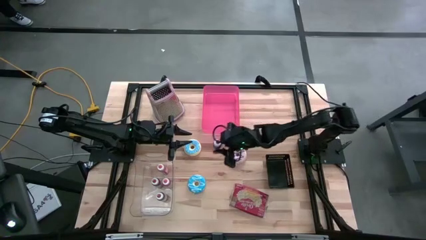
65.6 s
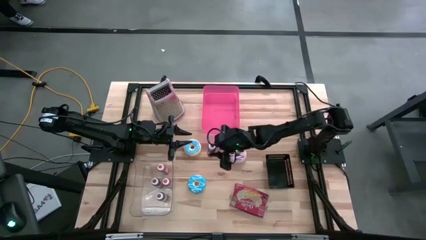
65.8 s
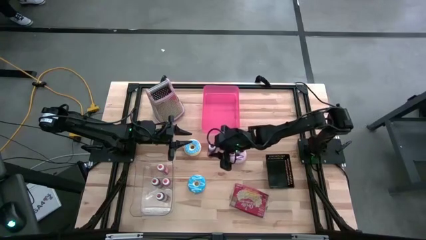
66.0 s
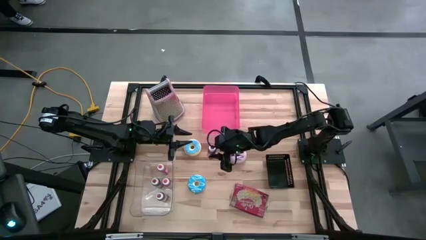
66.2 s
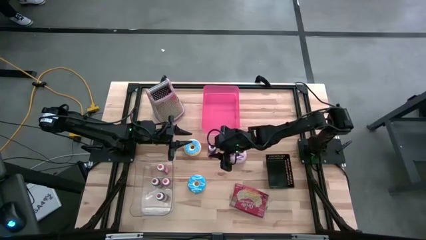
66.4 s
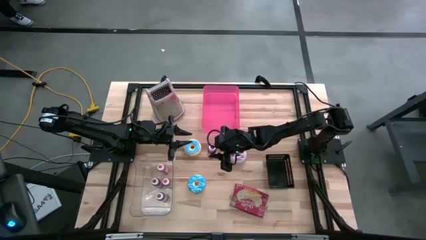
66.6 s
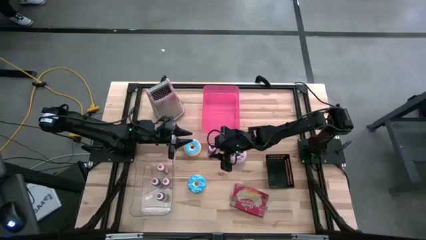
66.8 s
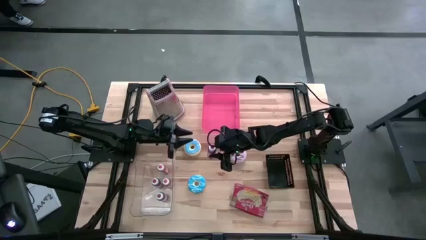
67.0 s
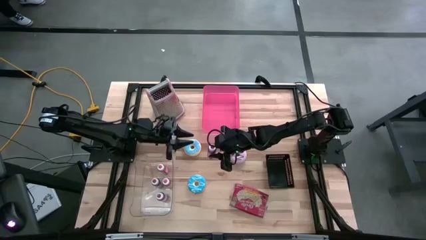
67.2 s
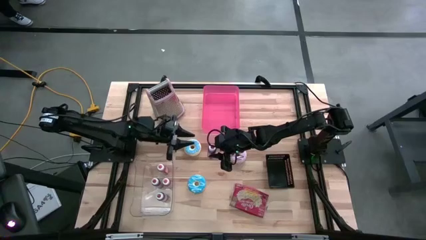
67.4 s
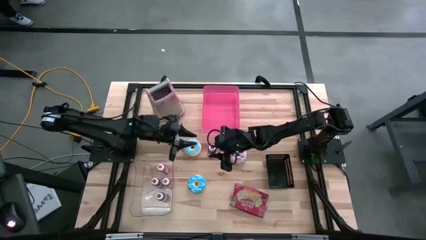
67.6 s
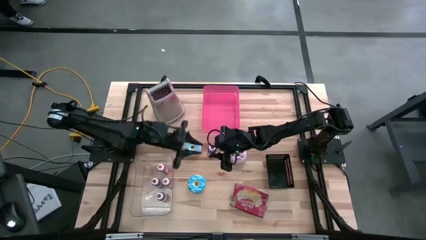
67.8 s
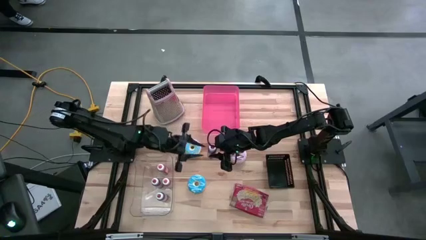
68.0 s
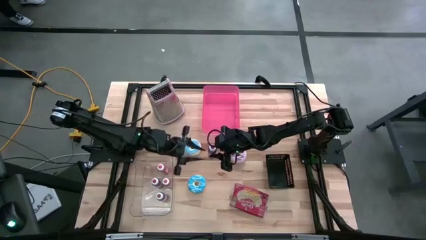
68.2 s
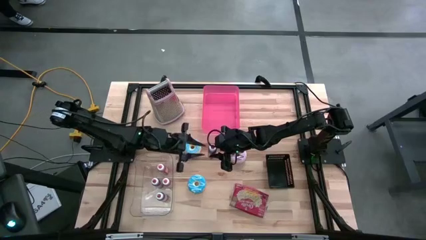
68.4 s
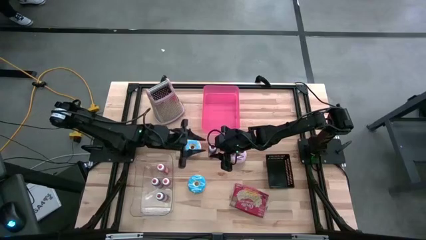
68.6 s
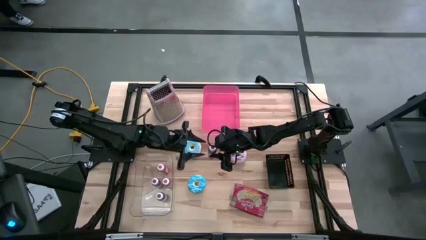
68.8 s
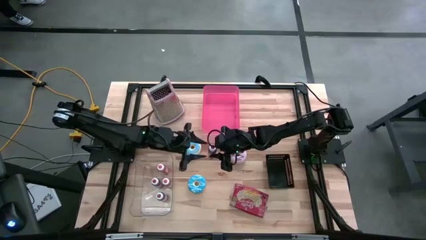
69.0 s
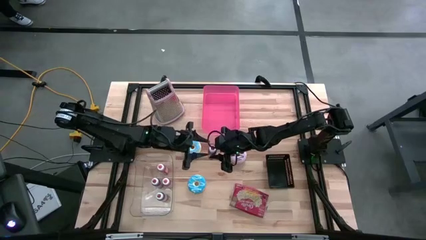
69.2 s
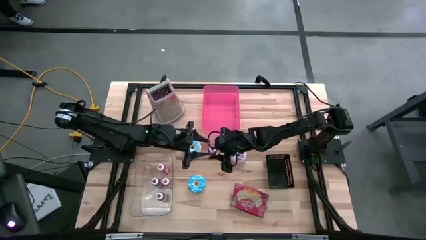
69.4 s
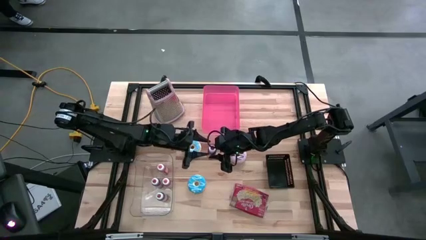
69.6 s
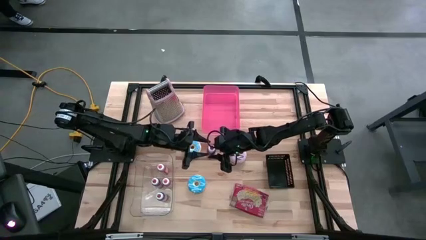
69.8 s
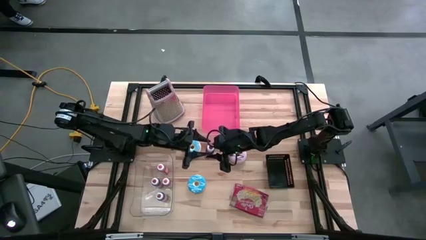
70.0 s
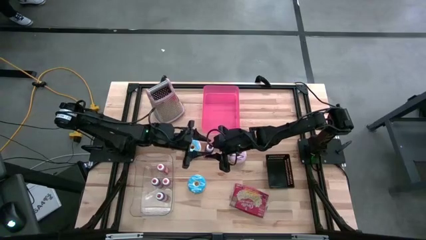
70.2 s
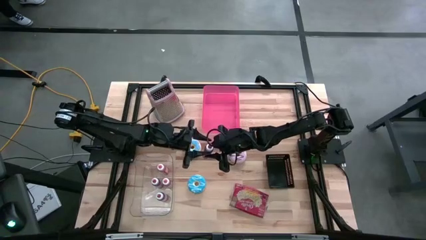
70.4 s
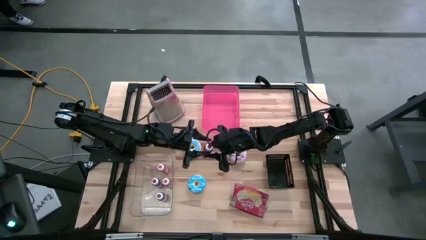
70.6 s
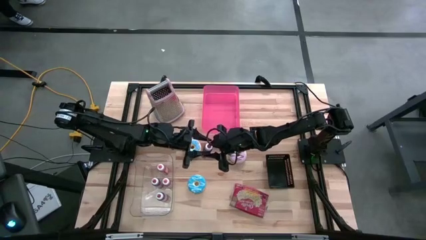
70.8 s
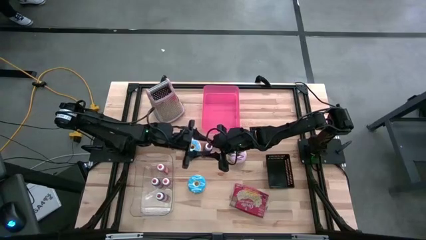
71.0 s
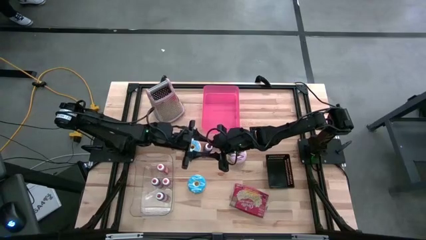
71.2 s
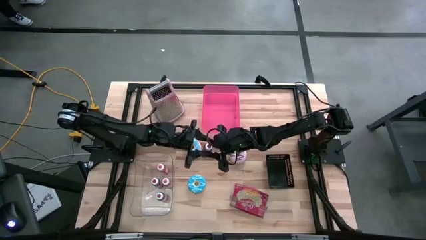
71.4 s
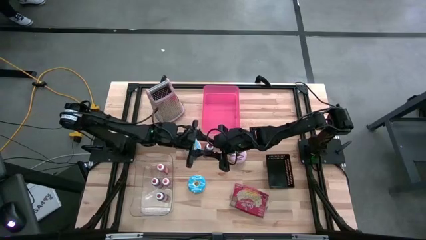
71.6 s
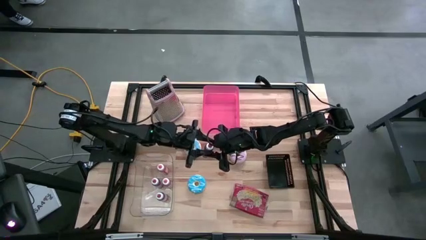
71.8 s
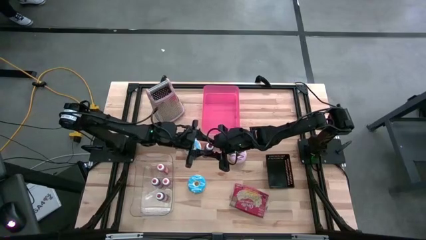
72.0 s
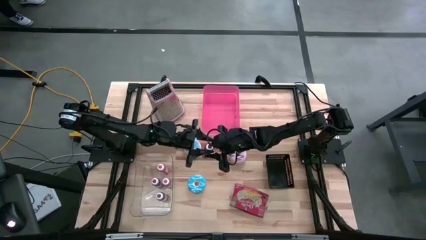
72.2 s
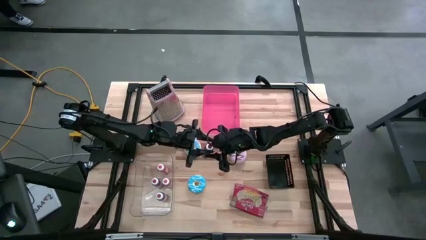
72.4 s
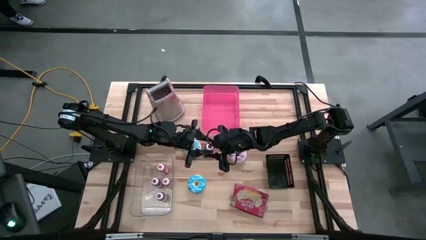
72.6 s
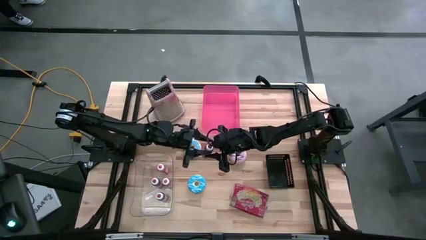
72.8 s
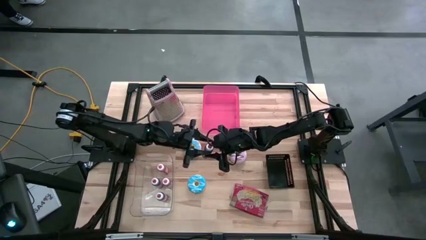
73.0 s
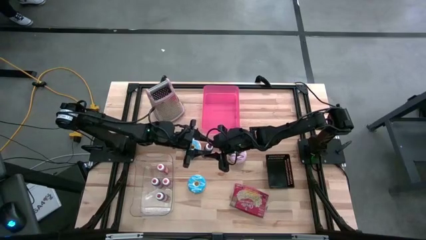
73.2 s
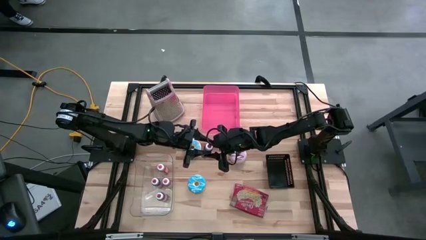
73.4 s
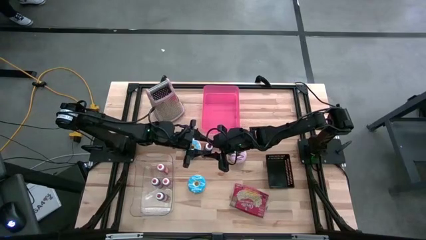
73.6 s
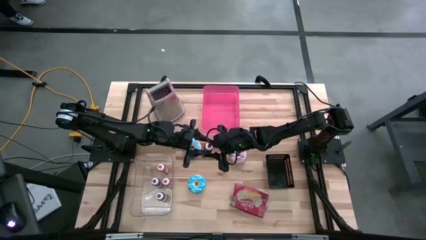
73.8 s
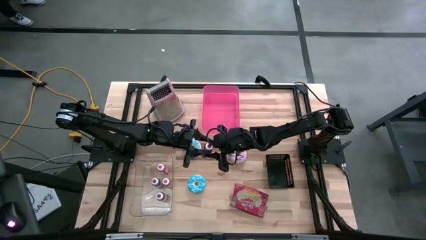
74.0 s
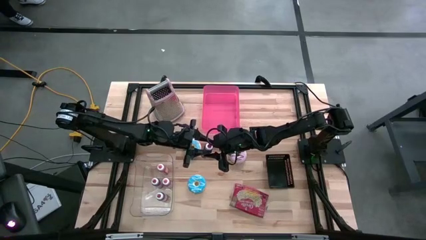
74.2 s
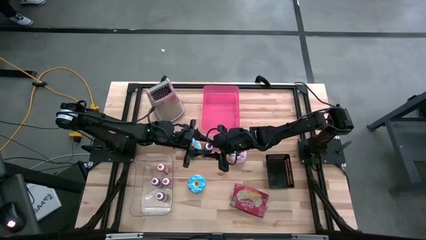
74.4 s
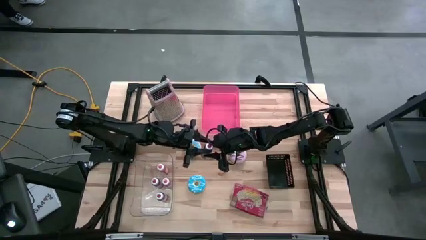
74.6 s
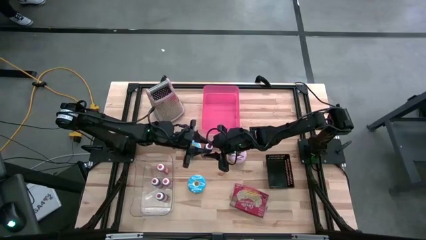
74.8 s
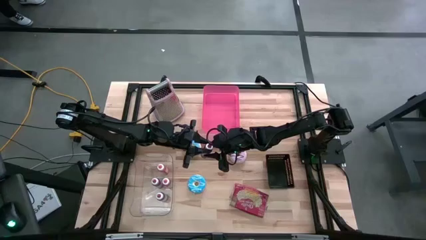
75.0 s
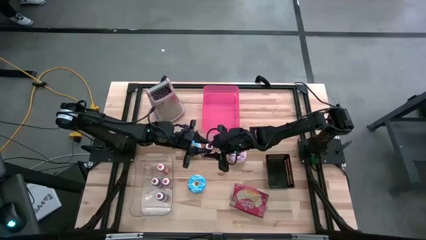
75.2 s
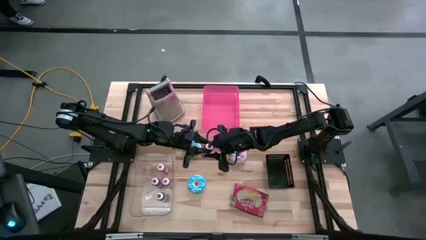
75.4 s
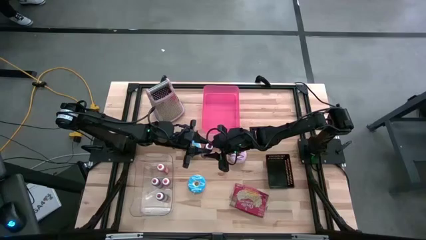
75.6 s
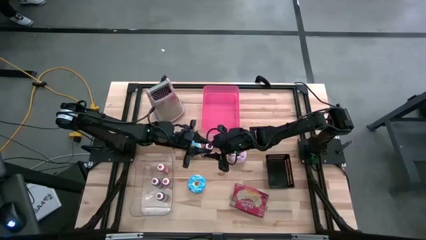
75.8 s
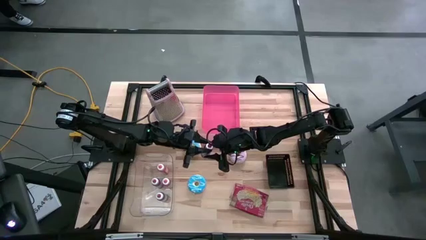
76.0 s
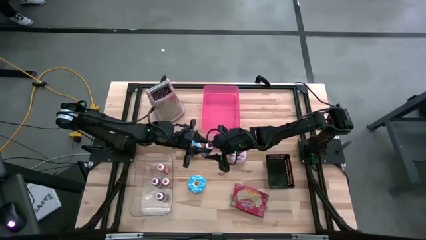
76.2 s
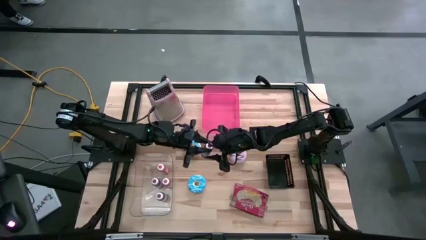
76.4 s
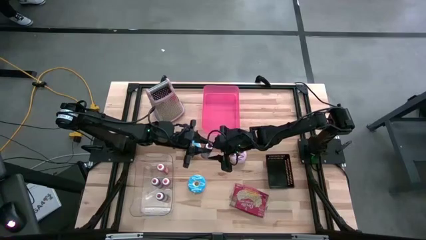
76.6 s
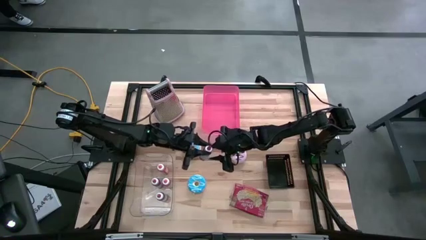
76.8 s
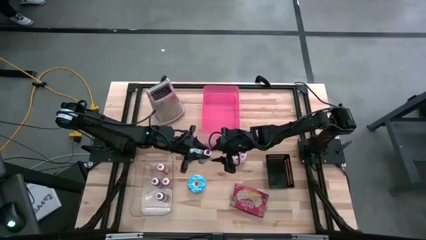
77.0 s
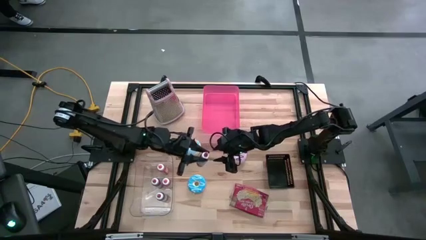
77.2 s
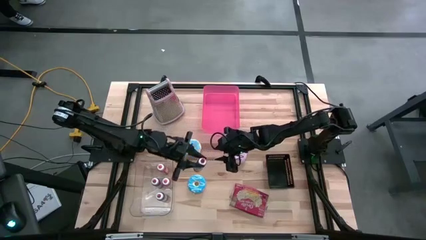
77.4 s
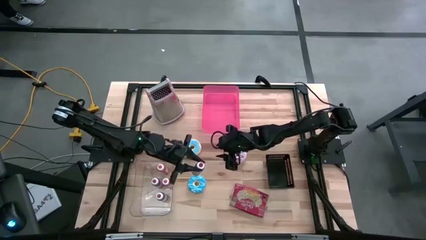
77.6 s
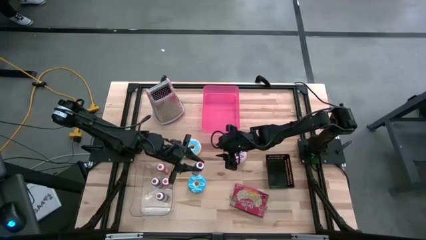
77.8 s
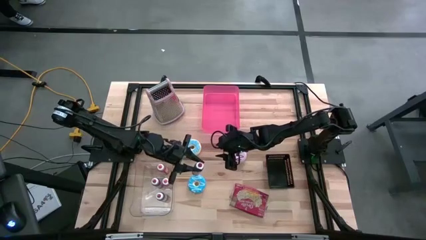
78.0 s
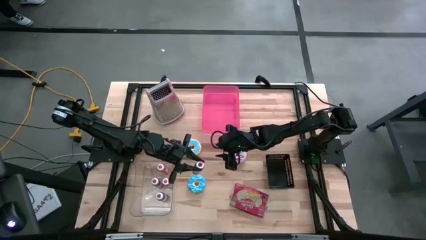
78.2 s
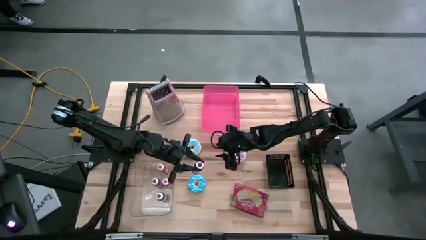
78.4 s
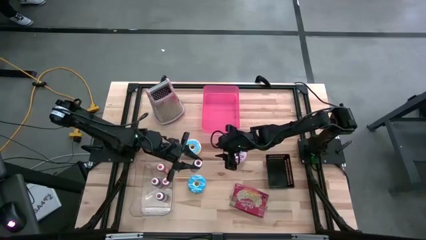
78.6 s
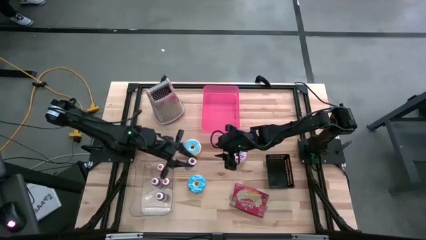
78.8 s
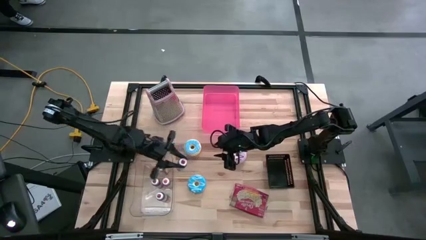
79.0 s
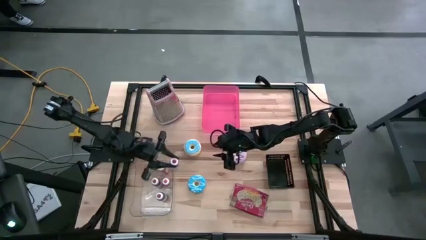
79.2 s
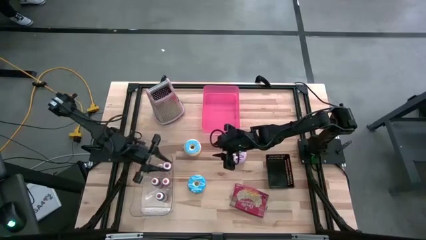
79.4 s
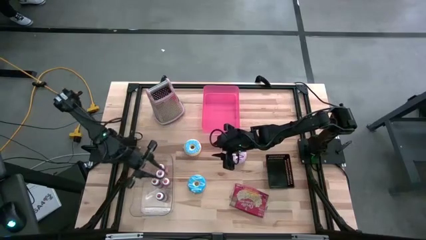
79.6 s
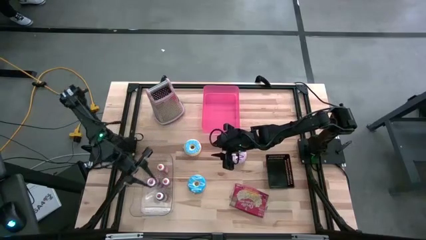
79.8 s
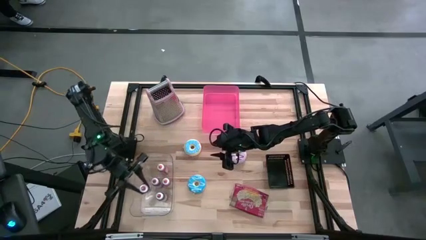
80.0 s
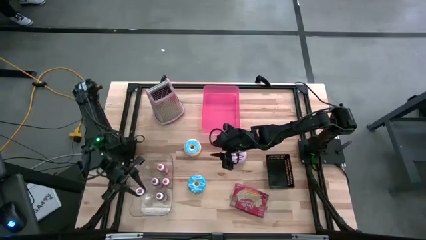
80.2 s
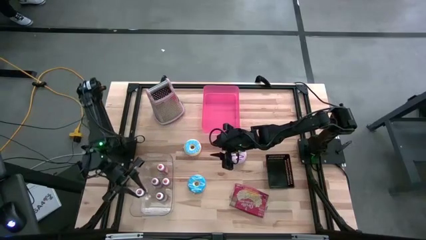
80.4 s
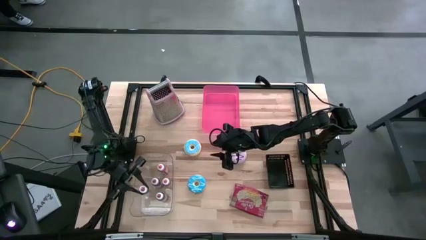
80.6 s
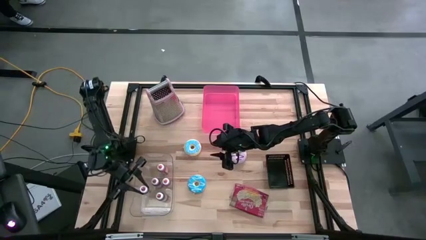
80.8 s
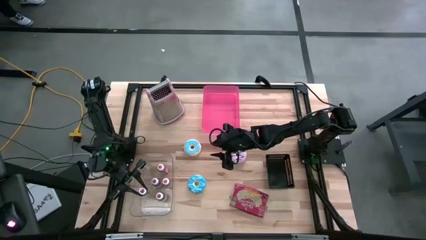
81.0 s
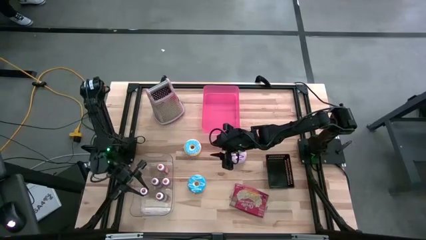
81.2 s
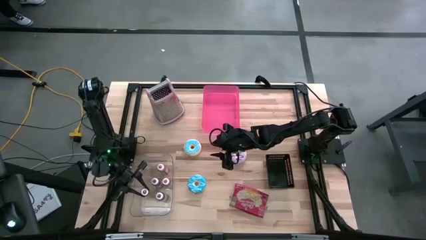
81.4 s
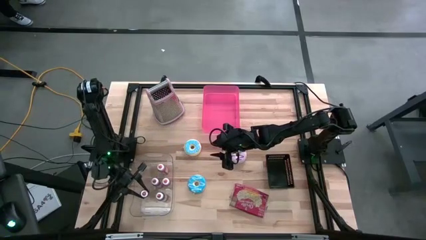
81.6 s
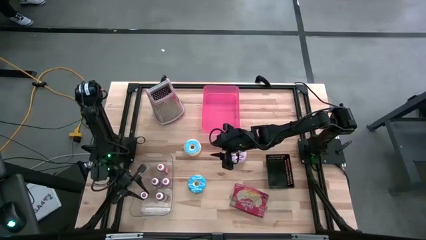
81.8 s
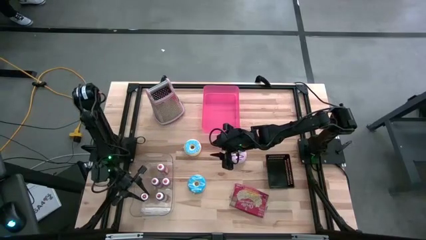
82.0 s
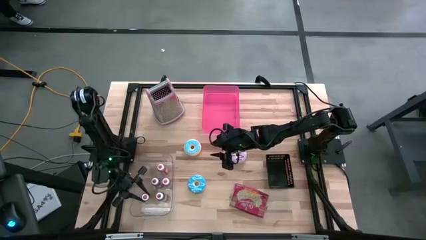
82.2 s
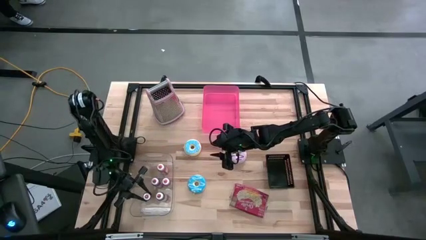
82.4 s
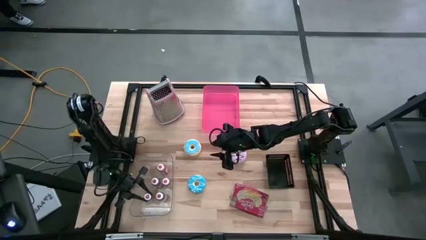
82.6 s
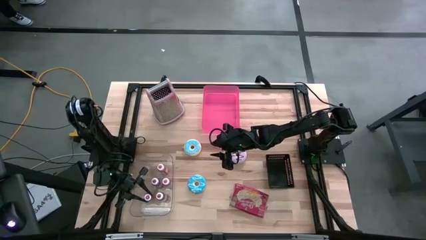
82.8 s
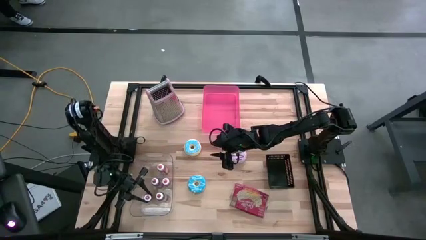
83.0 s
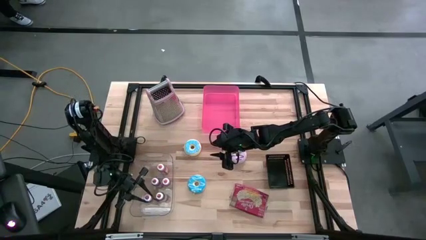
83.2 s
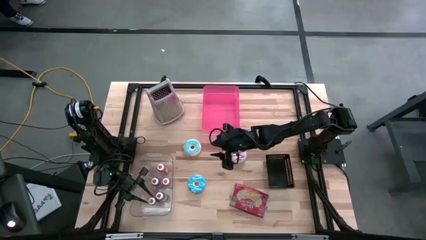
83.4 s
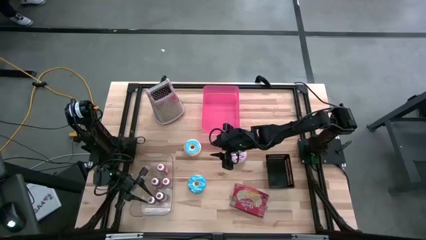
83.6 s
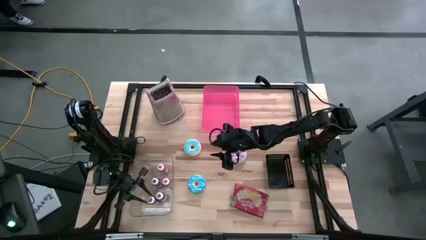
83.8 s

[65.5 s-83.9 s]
Put the red large food coloring bottle into the transparent bin
